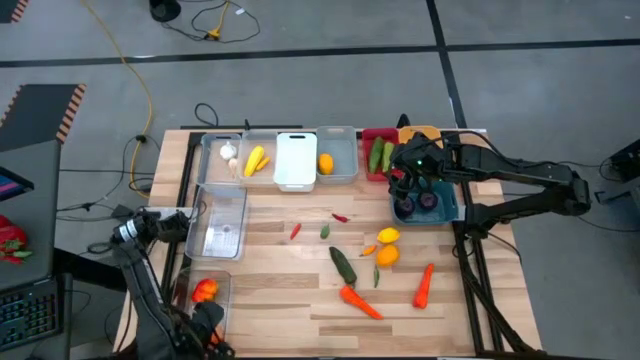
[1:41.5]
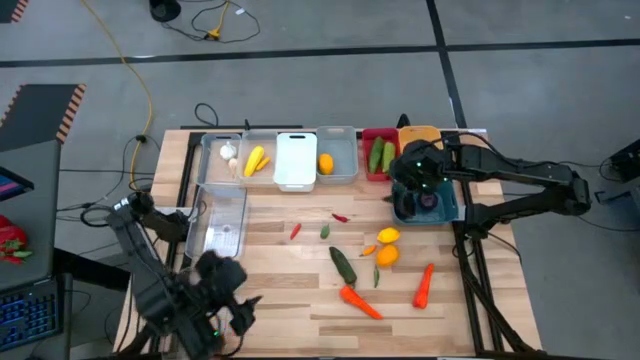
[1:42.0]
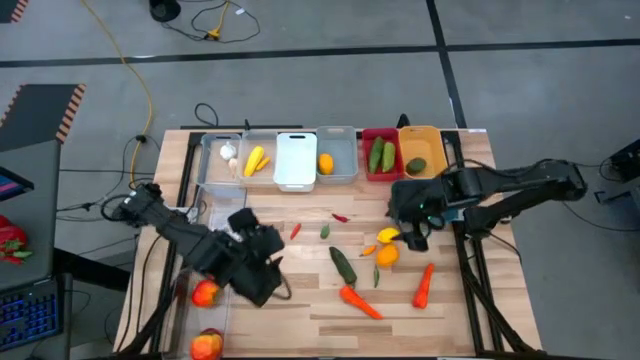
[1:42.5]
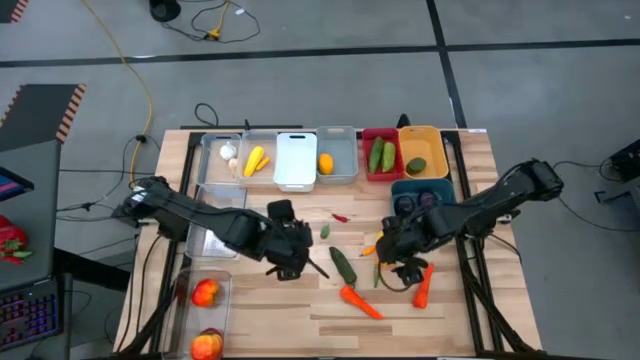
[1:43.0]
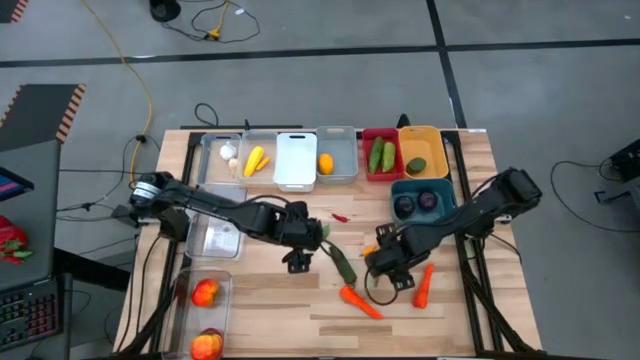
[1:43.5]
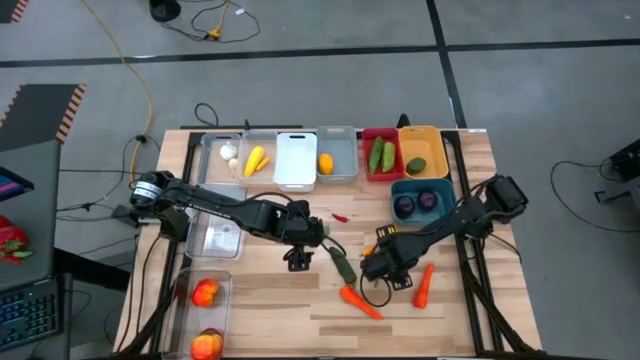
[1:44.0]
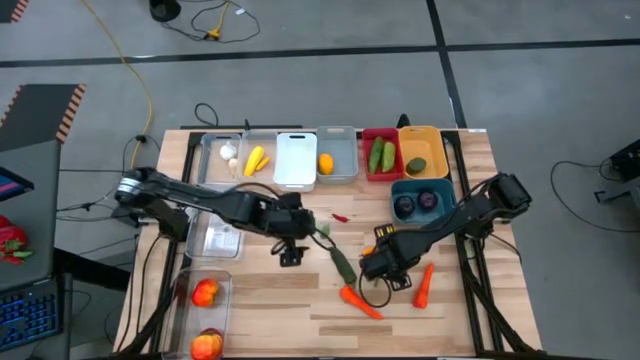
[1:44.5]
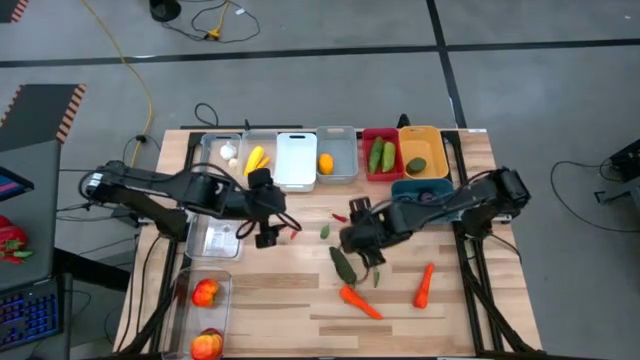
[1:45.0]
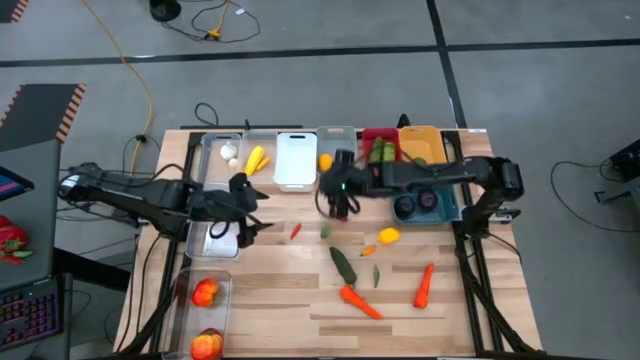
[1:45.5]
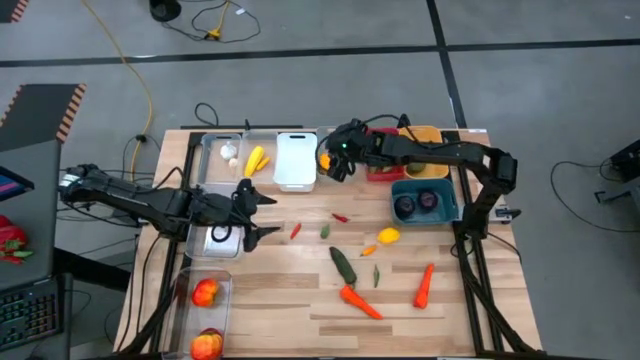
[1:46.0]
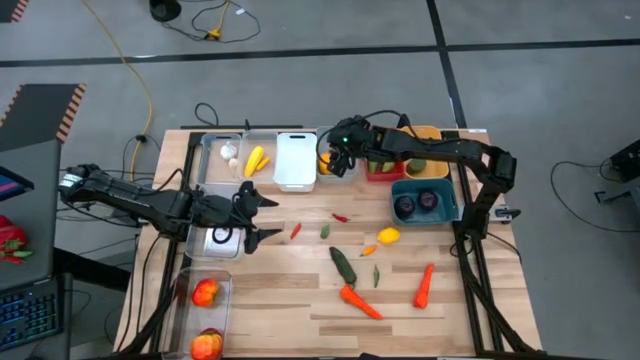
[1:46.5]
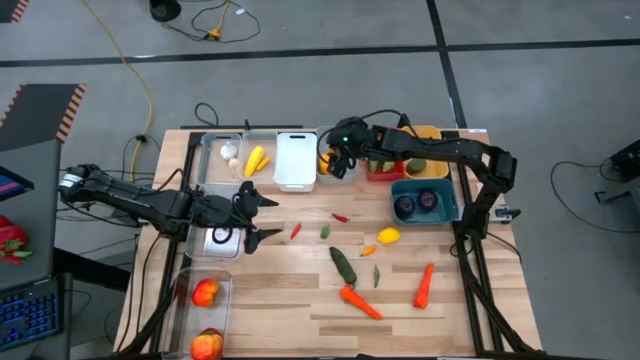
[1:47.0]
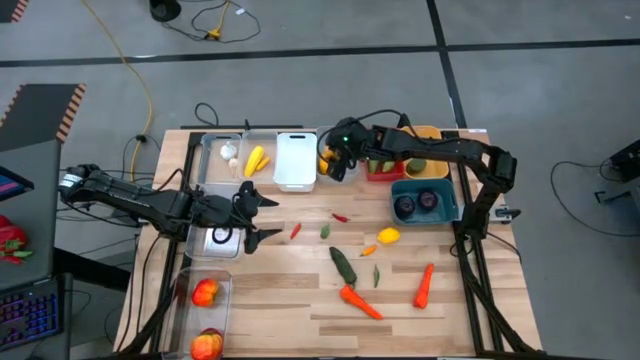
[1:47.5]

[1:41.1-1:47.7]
Task: Sort produce into baskets
Put the bottom lemon into the gray bin

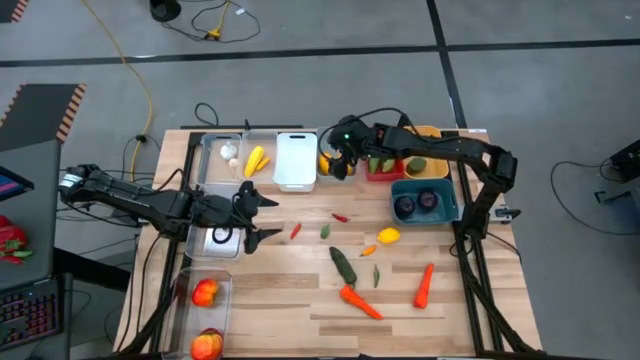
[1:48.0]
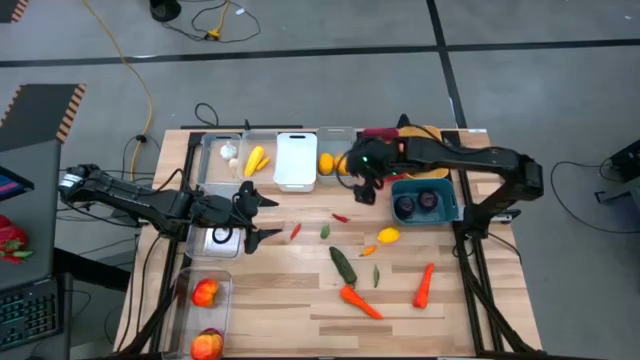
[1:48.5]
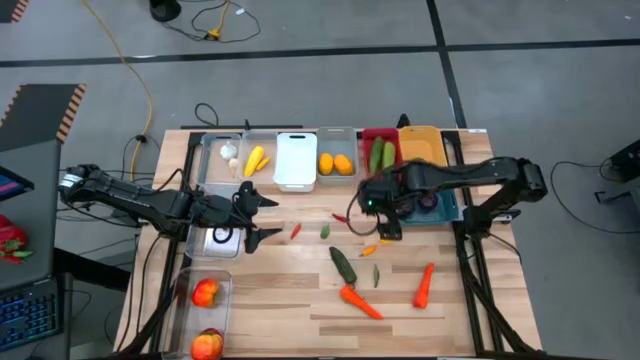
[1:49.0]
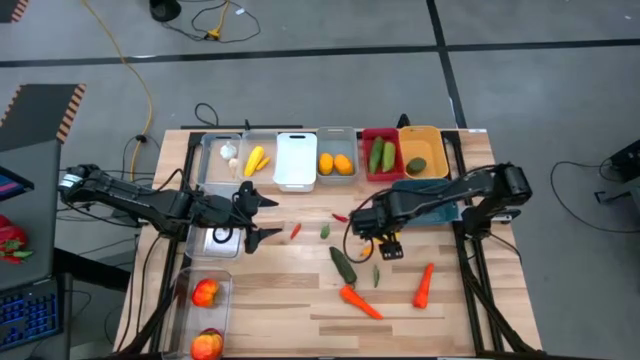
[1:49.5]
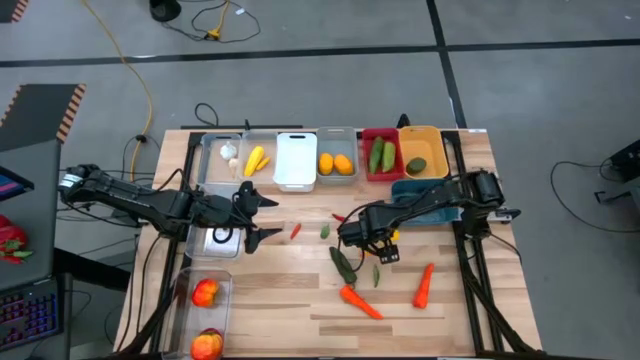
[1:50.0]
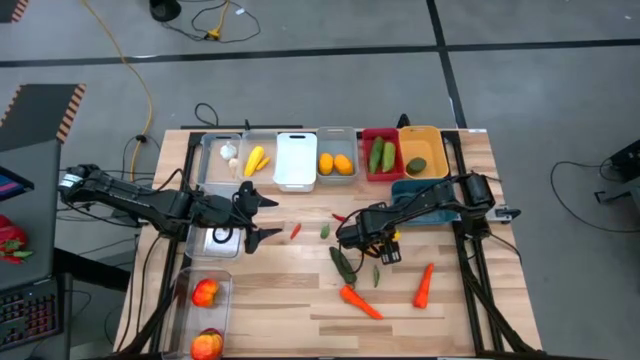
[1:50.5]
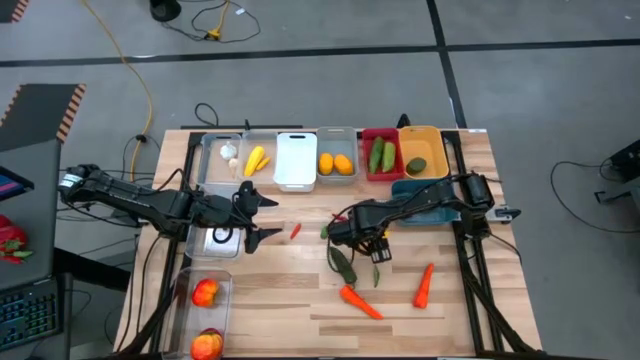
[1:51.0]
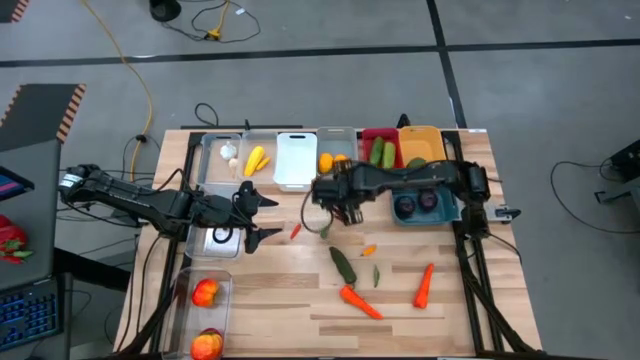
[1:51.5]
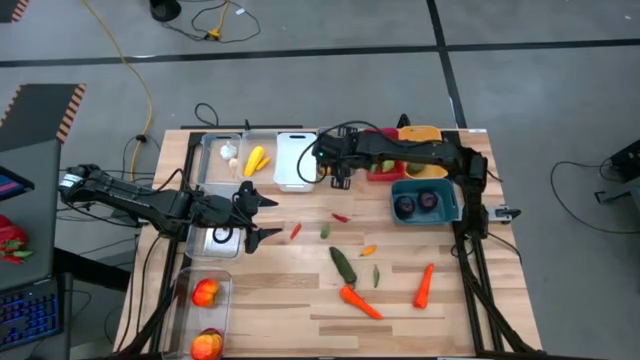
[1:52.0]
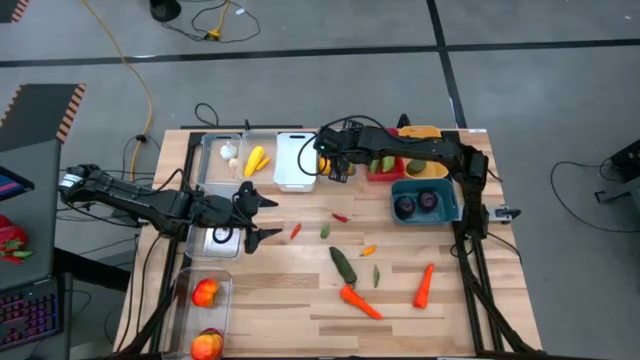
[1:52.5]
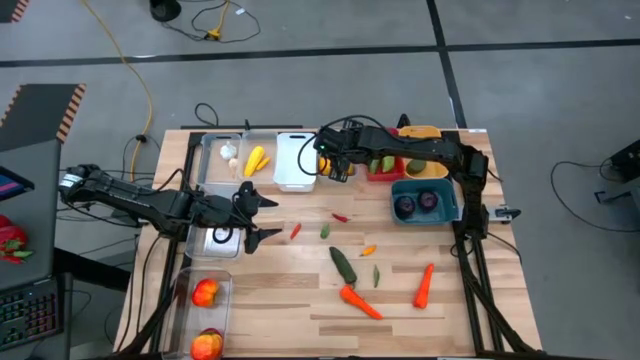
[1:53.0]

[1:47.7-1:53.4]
Put the lemon into the gray bin

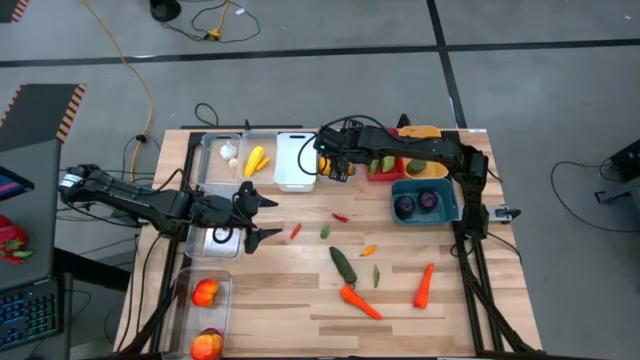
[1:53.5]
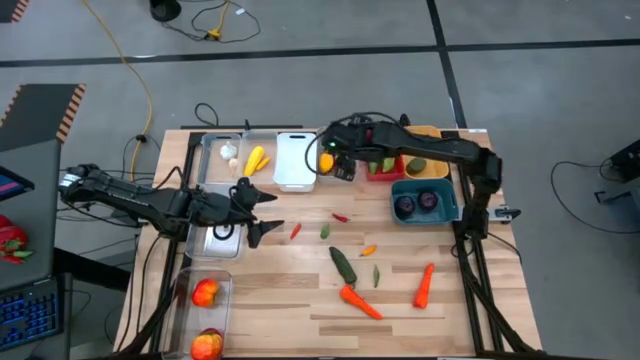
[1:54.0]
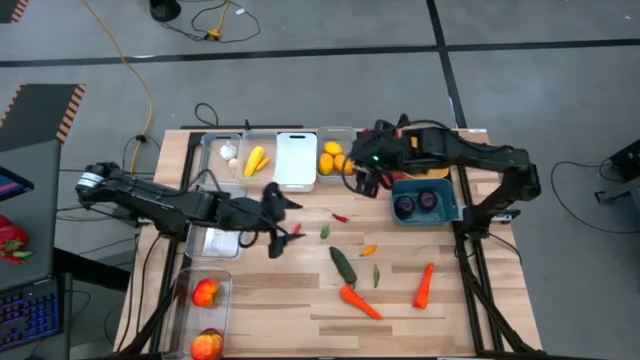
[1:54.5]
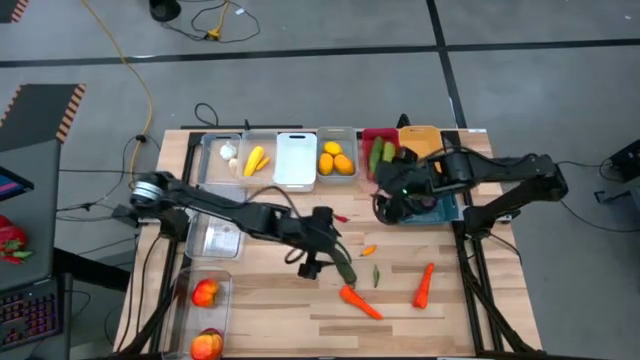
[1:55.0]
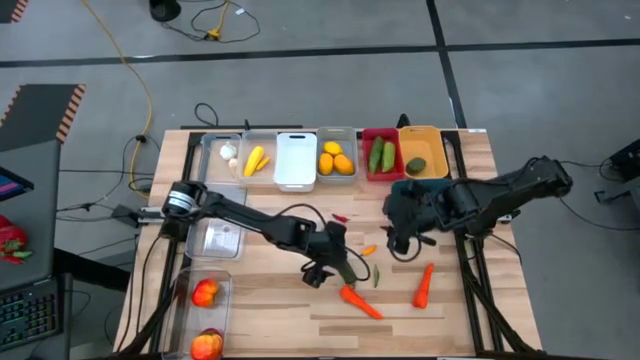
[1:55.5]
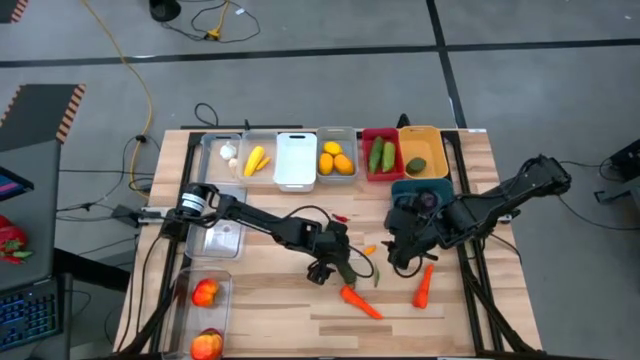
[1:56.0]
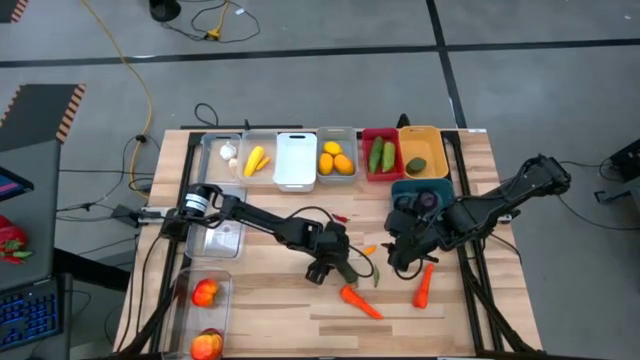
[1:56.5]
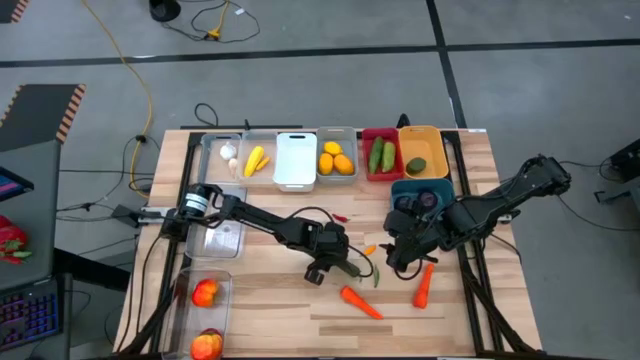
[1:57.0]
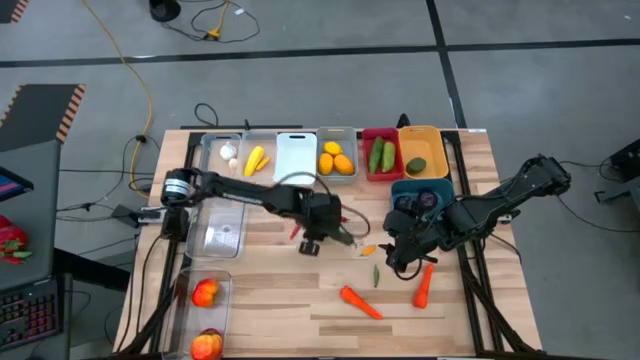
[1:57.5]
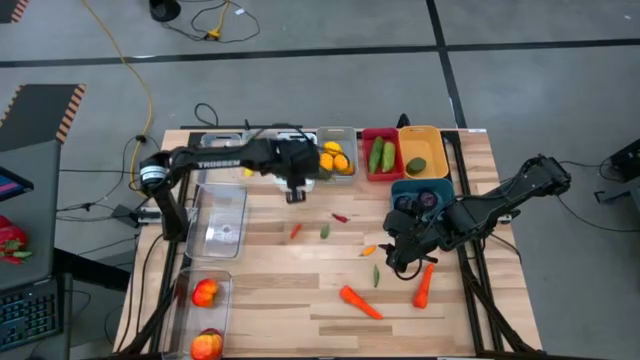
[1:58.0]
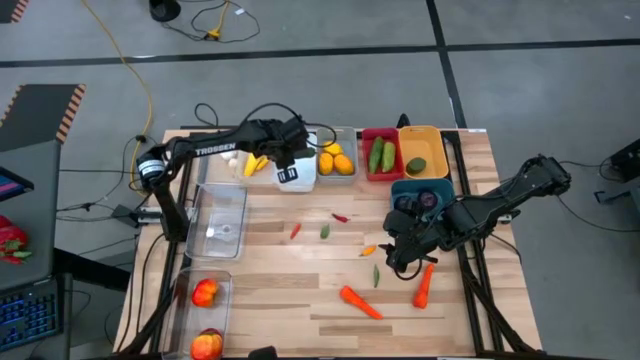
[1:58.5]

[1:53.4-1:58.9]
Put the bottom left green chili pepper into the white bin

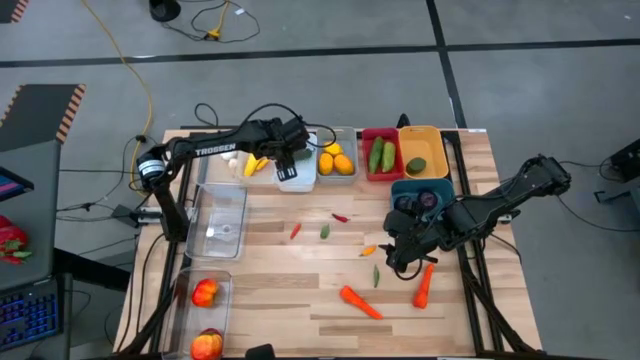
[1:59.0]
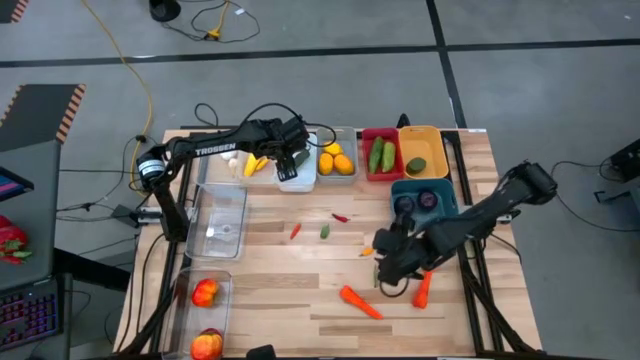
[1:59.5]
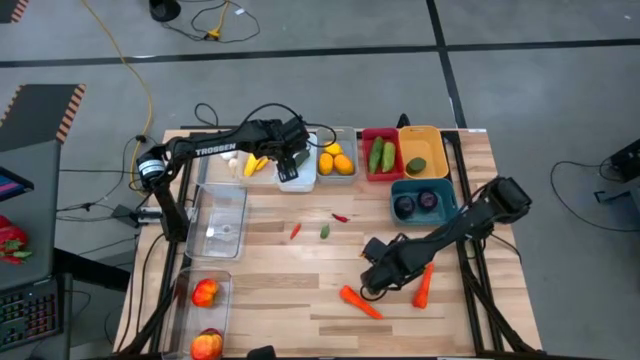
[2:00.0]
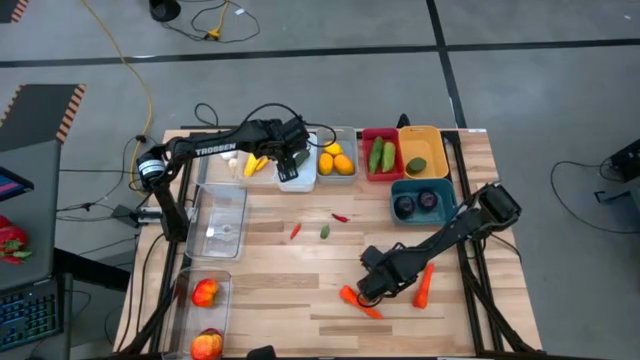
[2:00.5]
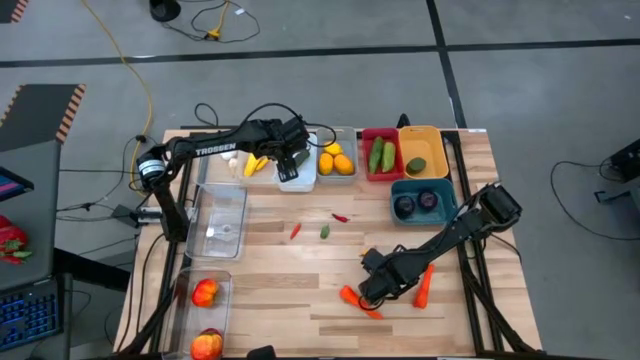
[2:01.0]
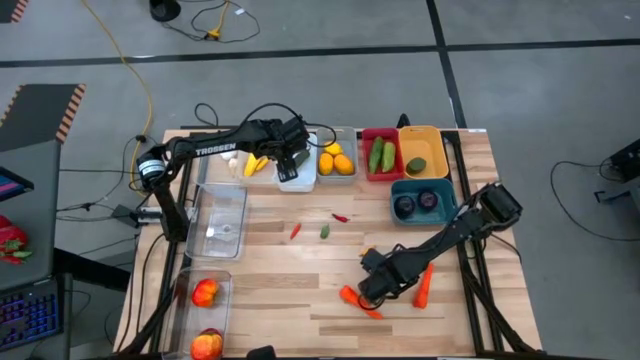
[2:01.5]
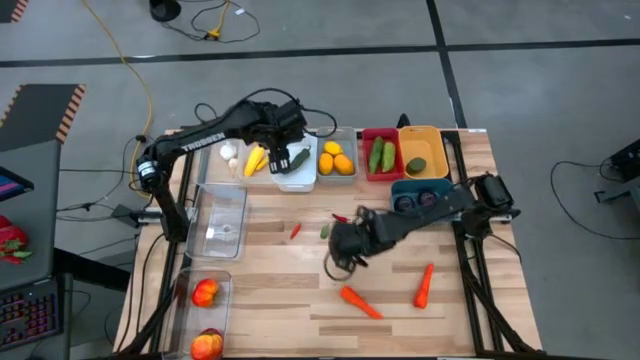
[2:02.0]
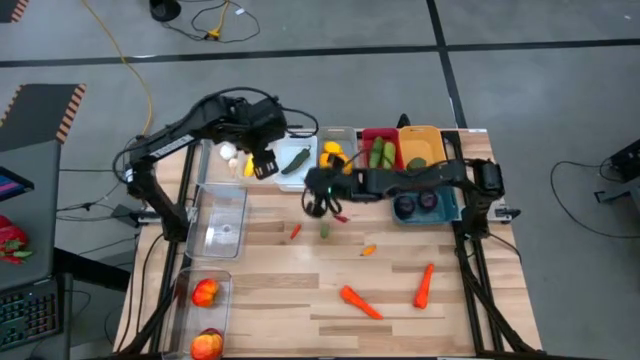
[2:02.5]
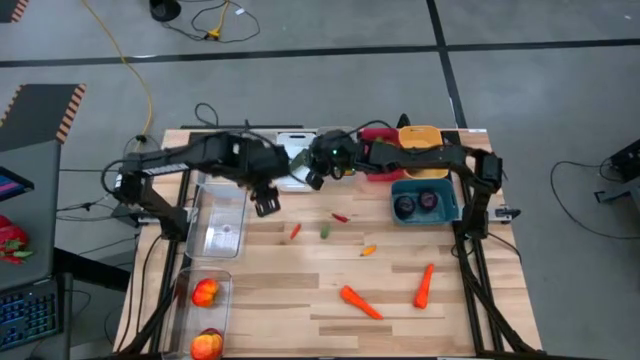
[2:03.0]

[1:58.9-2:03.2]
Put the bottom green chili pepper into the white bin
